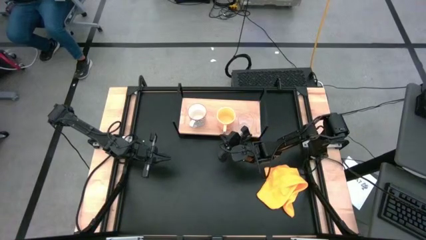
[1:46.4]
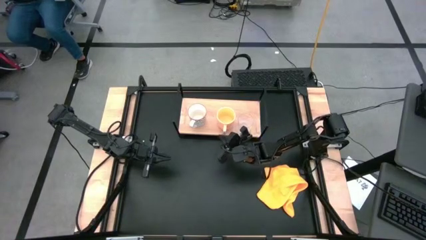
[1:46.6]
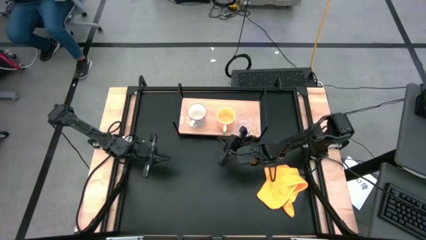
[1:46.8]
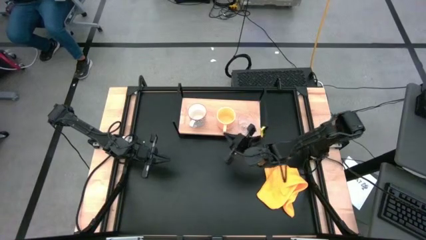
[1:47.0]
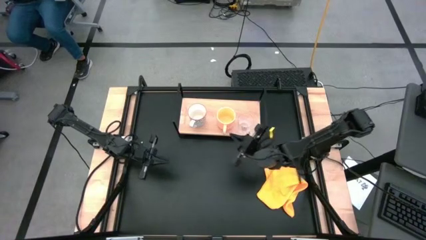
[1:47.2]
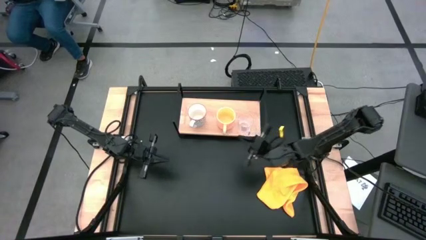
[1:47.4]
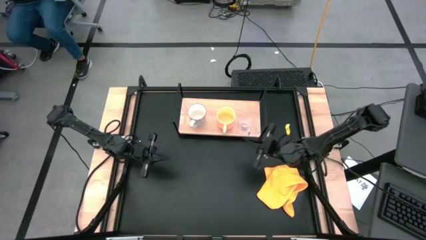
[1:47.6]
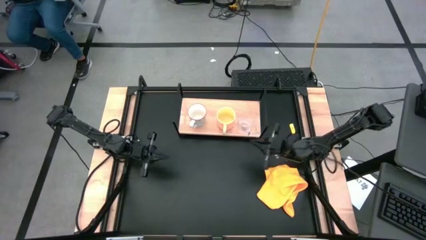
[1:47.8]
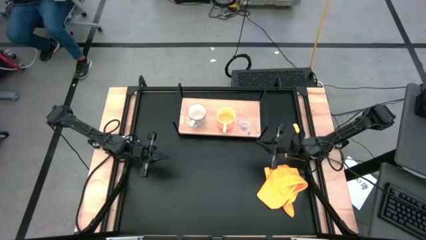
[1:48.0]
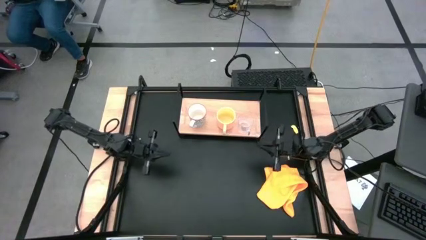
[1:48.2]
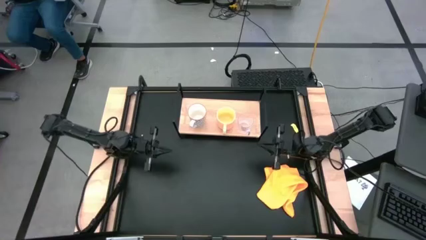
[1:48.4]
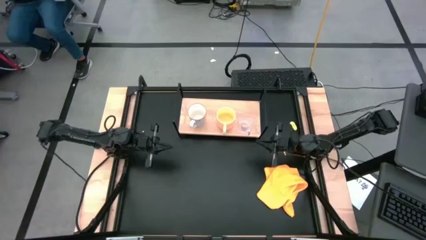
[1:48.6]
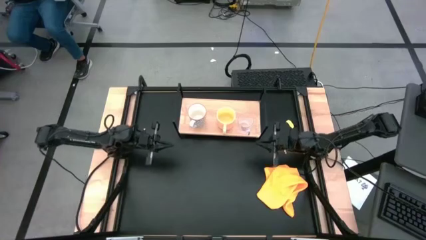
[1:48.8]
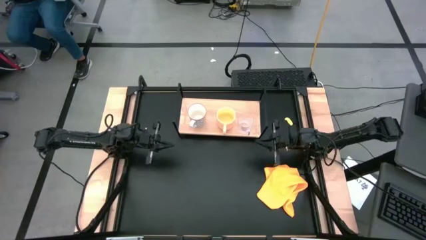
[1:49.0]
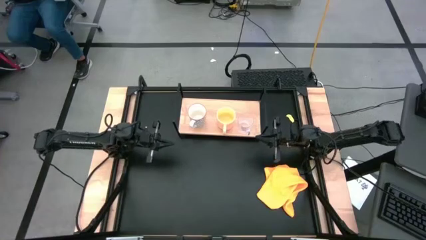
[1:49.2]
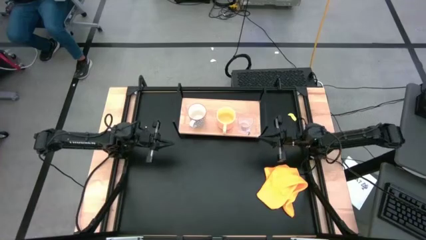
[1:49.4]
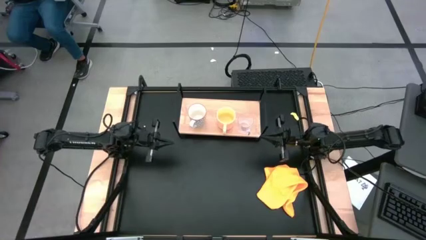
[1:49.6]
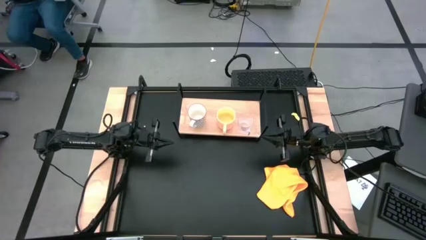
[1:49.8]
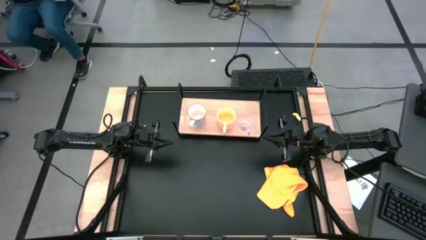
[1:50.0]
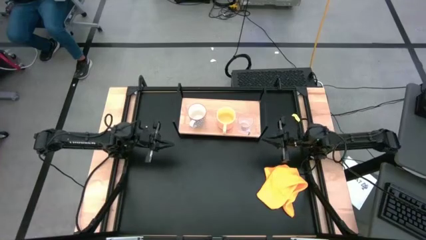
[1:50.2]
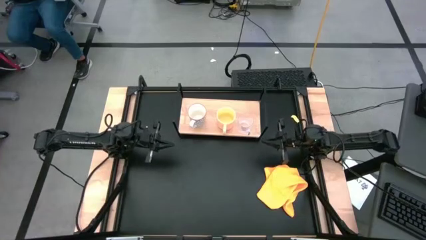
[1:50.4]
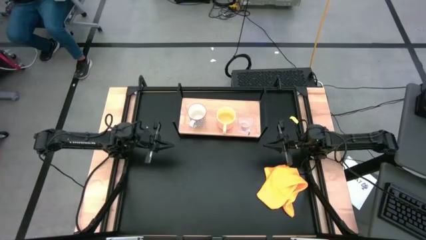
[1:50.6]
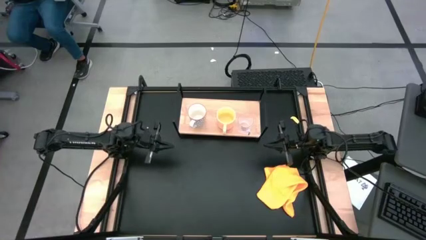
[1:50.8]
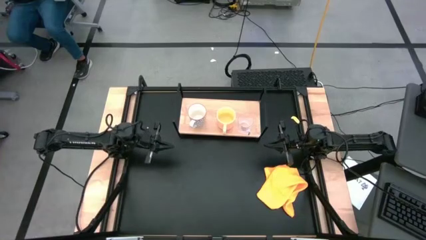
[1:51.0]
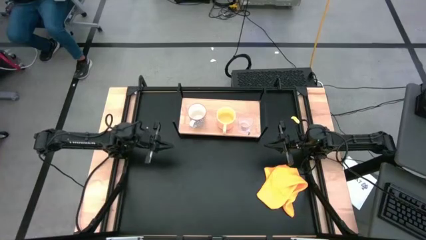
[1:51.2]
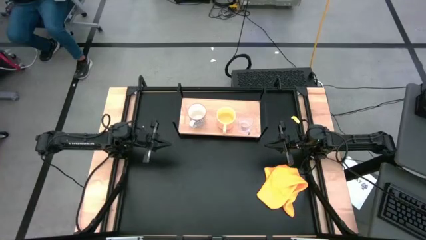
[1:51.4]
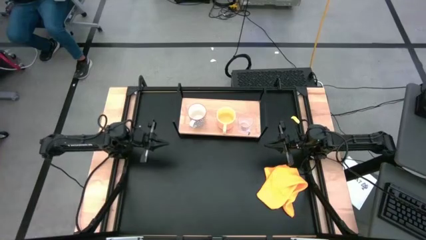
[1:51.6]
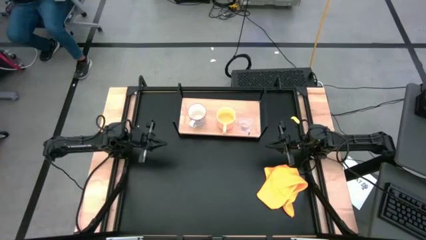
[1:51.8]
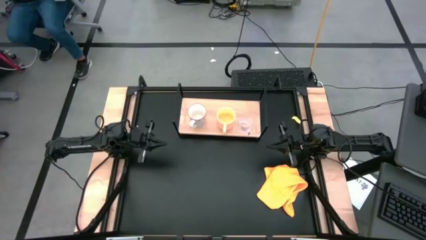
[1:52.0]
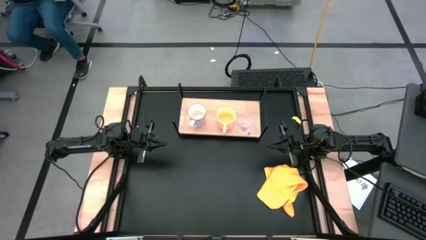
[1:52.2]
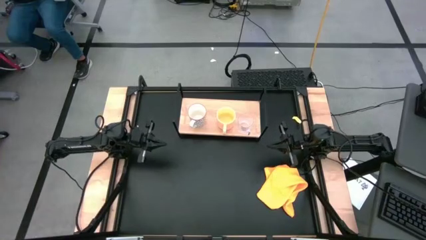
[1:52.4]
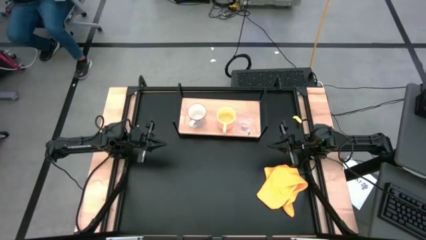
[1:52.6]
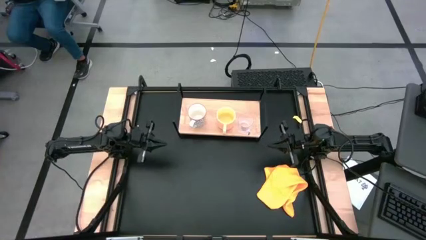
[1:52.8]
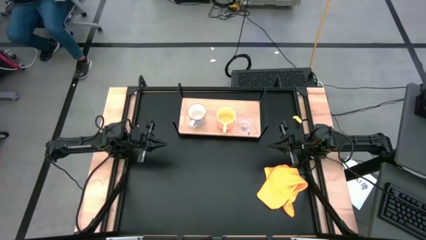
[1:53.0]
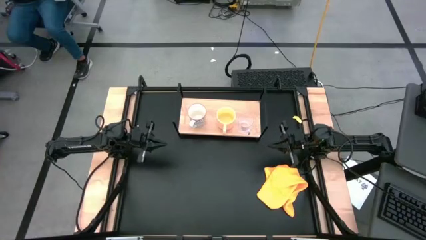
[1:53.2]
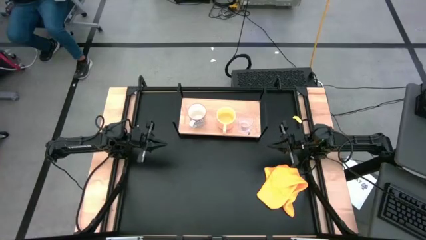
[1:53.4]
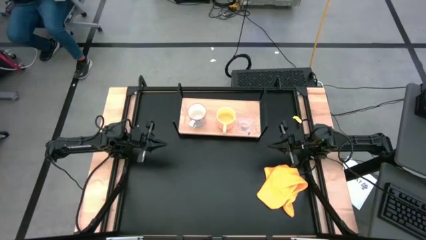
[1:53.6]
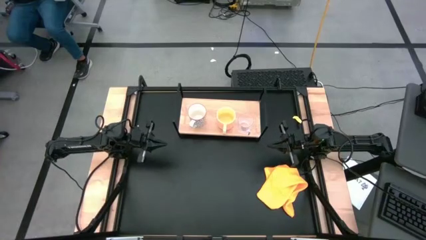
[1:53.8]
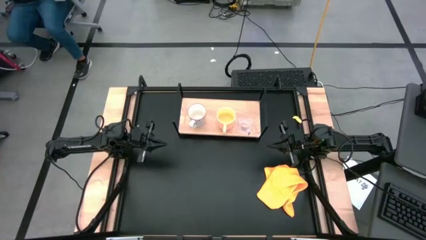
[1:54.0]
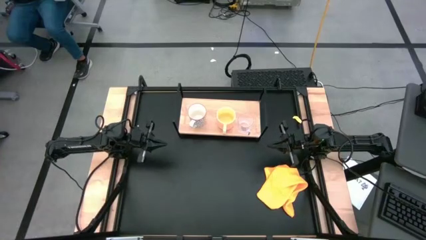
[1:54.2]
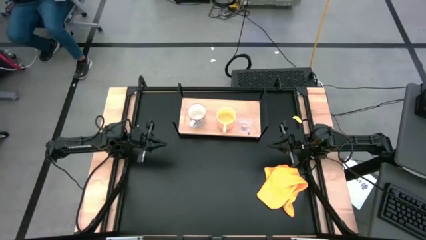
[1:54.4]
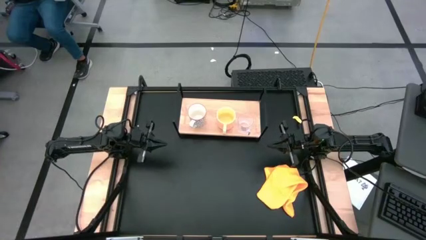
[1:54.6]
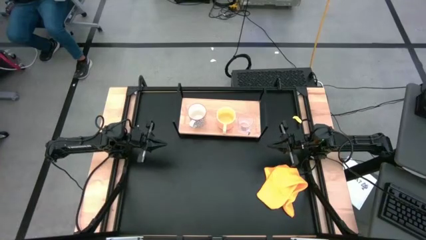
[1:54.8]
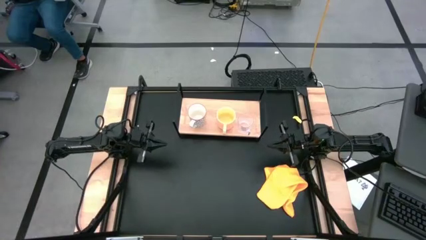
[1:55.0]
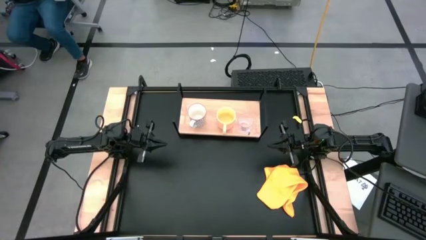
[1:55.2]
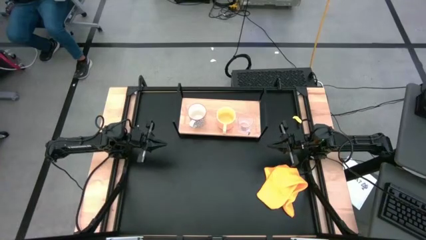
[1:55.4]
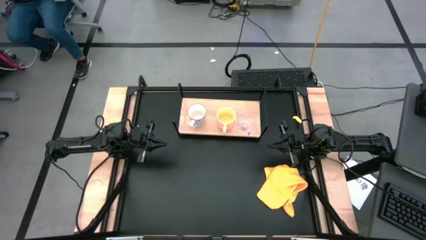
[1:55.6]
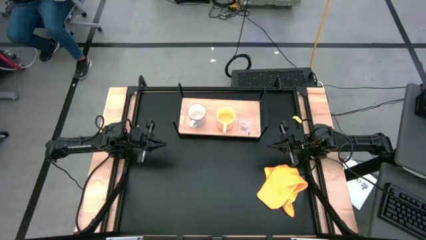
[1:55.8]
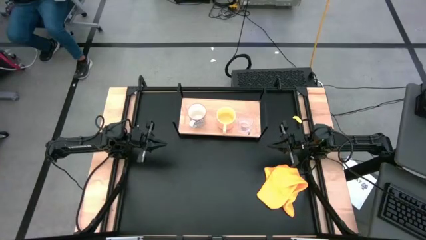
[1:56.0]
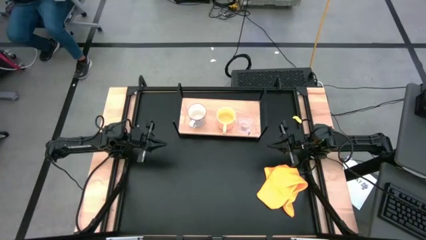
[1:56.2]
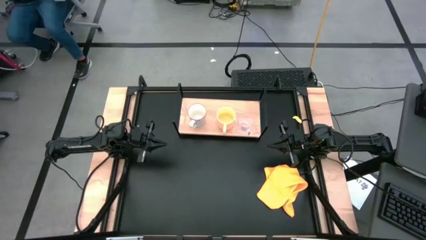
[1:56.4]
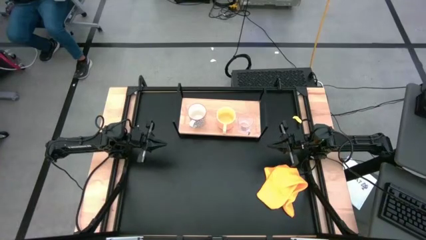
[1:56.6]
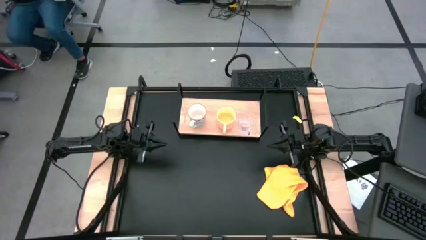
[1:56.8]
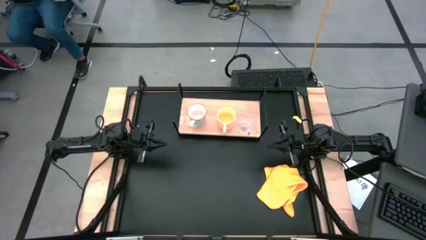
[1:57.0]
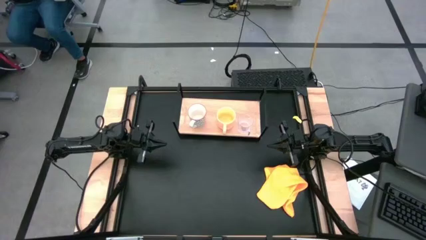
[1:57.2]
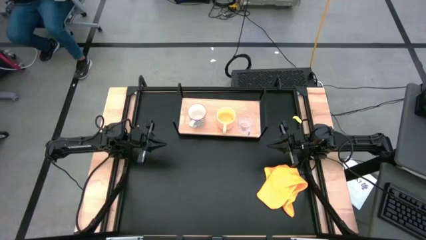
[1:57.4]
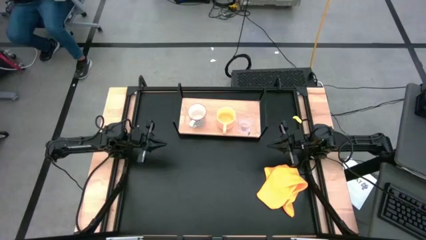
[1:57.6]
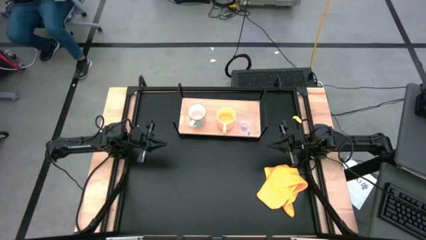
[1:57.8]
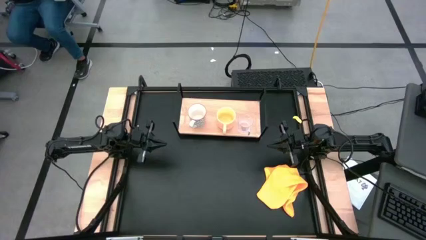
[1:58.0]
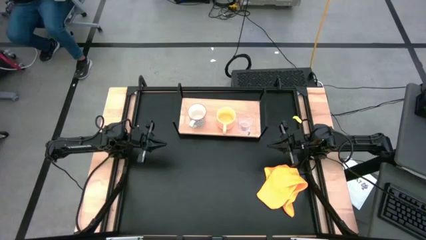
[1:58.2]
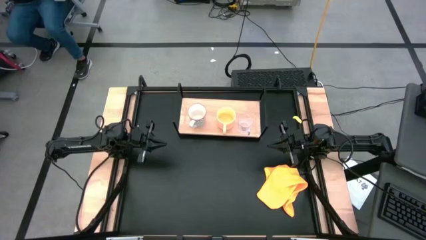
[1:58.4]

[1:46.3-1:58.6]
Task: Stack small to large cups/mugs on shelf
Return to Home Position

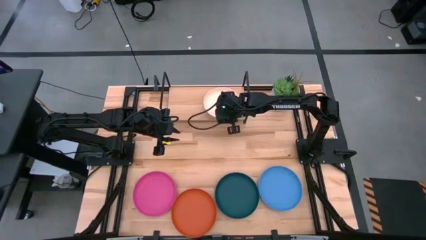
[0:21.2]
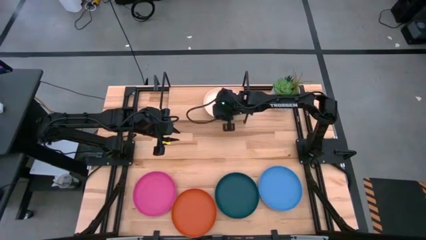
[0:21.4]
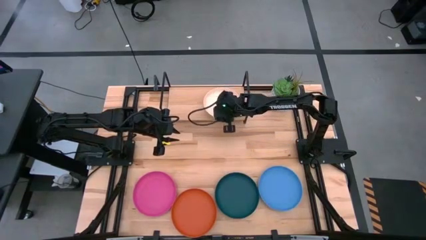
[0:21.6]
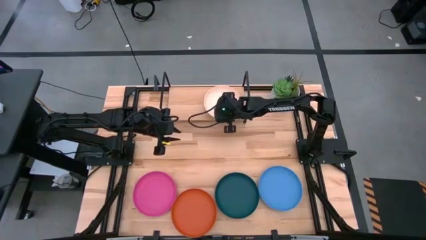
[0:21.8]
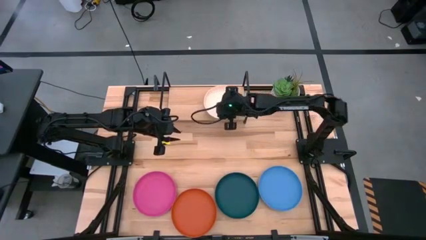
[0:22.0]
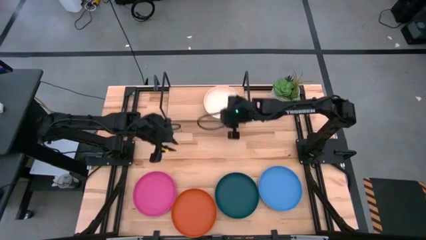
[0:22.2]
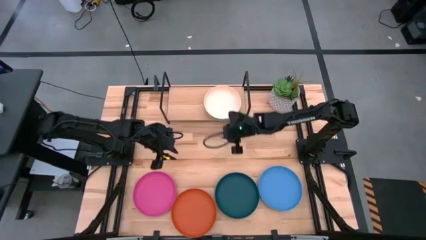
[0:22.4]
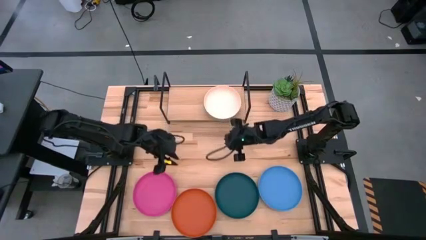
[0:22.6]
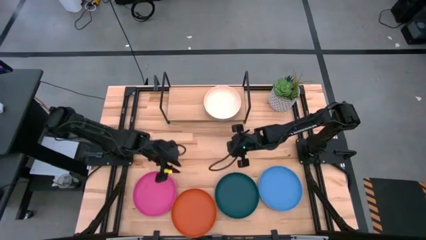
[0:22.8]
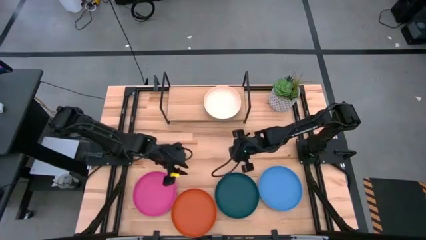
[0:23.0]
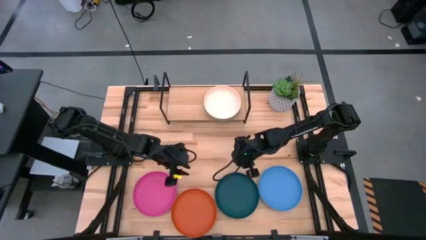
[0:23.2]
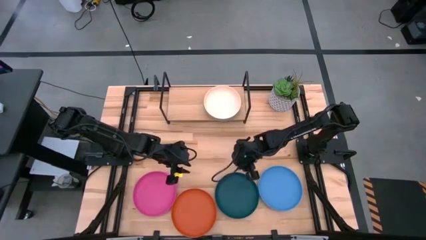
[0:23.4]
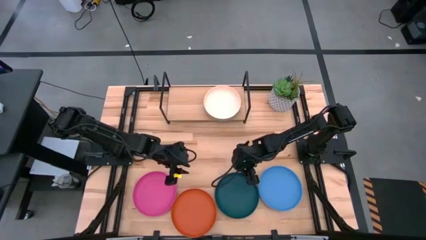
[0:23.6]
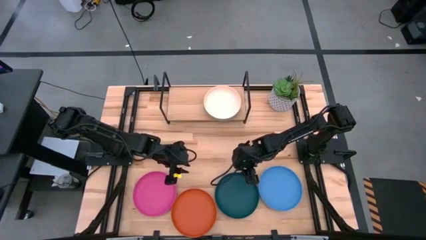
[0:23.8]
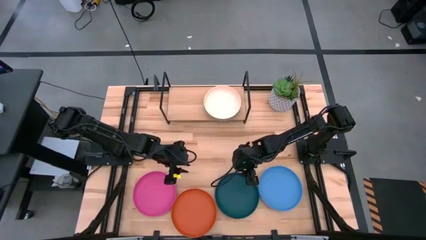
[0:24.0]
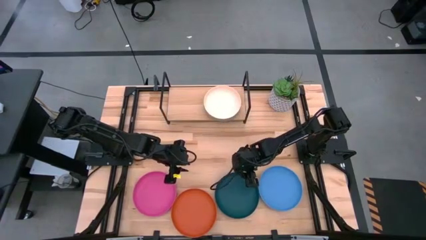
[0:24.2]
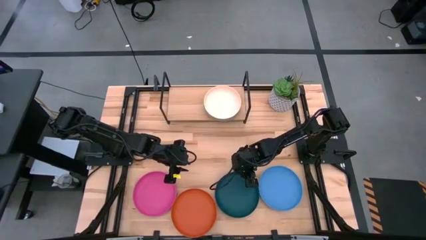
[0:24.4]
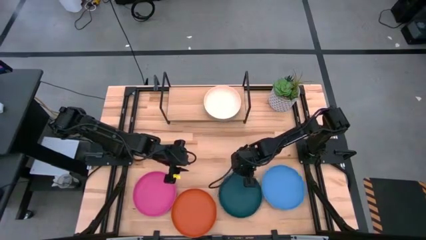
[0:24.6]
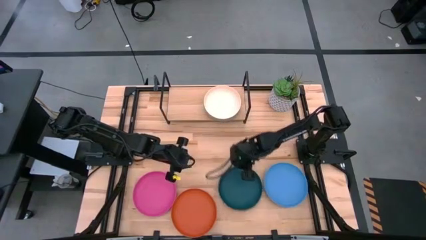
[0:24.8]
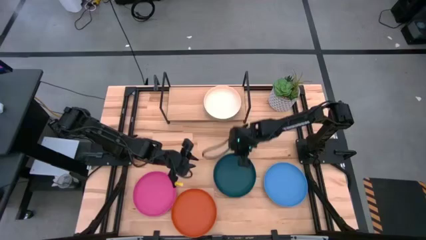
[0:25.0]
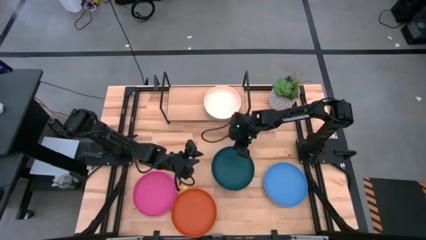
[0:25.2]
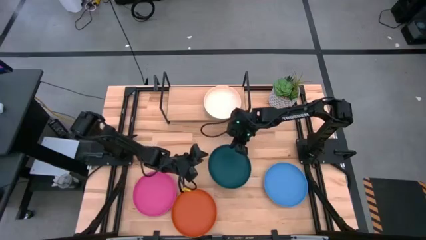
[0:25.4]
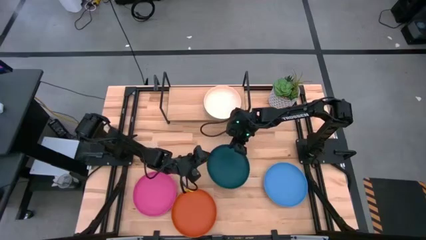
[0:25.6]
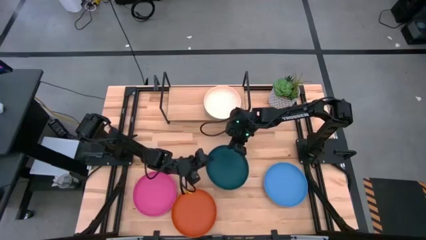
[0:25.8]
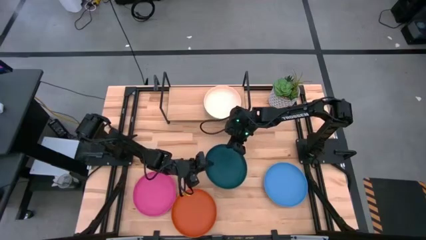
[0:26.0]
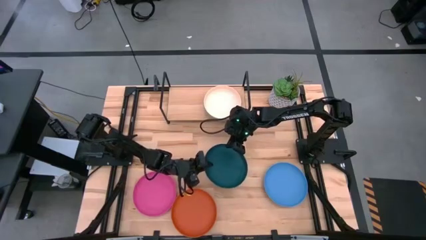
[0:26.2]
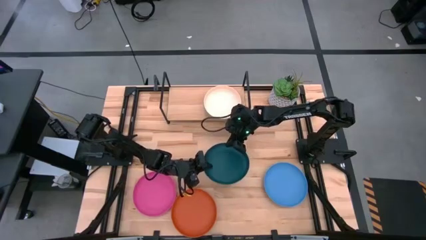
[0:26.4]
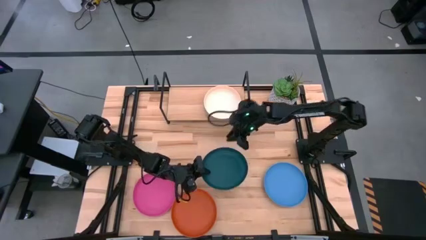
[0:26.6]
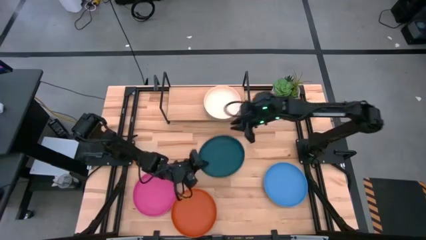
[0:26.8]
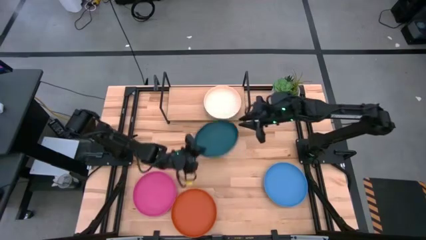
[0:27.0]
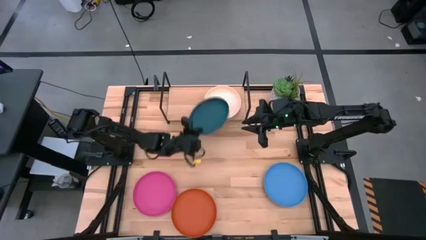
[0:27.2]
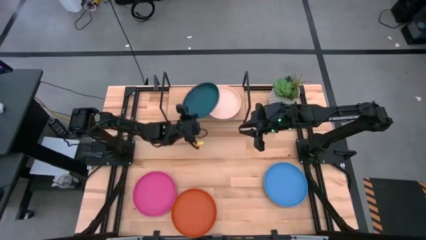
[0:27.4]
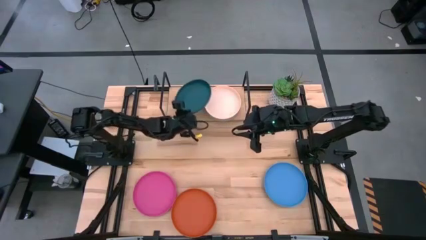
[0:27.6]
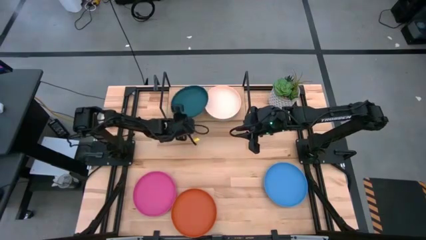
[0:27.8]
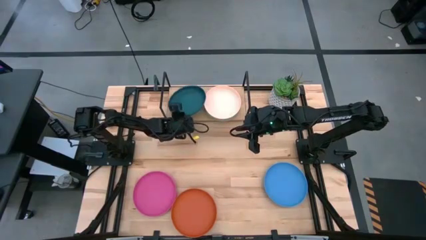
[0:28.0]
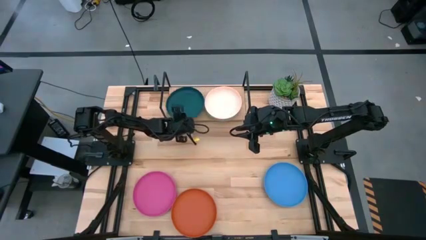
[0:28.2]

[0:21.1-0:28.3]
Task: Place and stack plates onto a shelf
Put the dark green plate on the shelf
